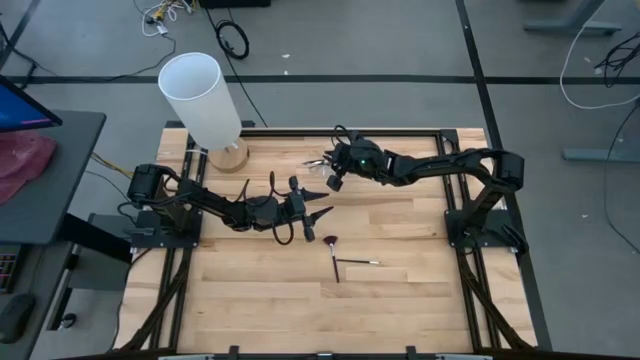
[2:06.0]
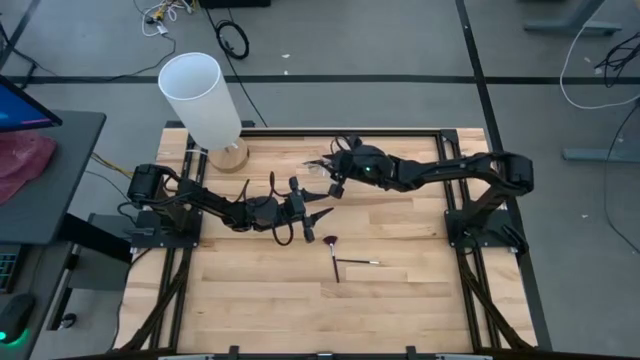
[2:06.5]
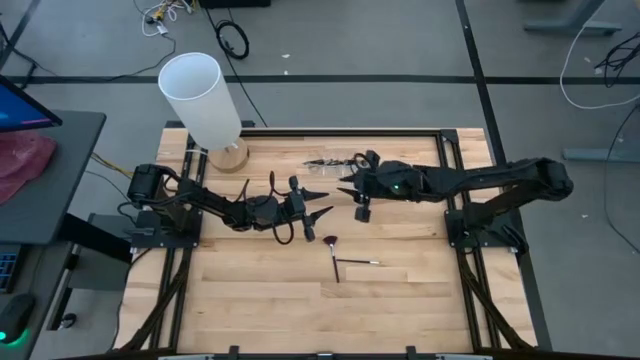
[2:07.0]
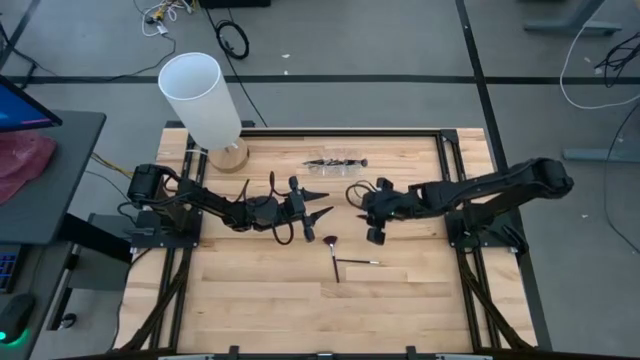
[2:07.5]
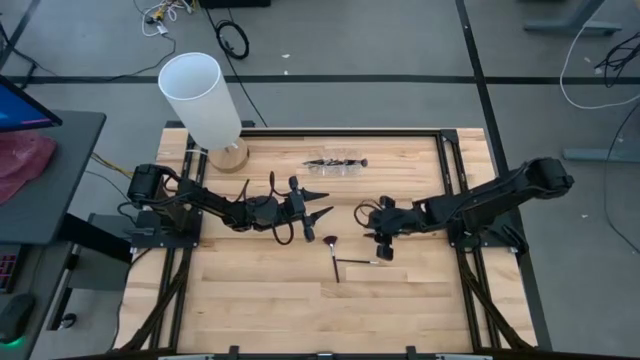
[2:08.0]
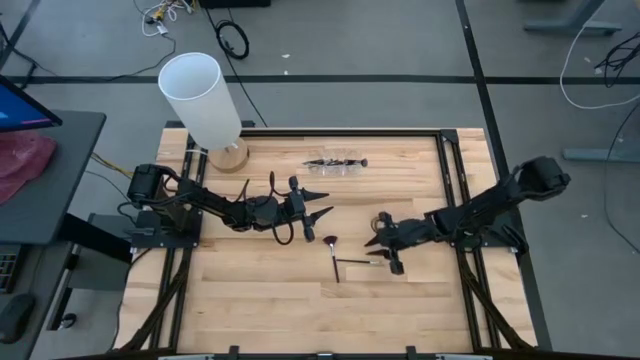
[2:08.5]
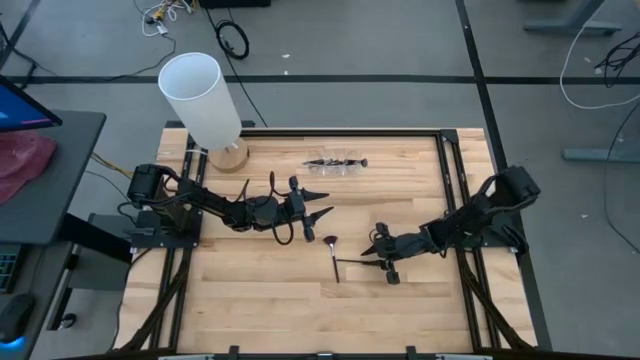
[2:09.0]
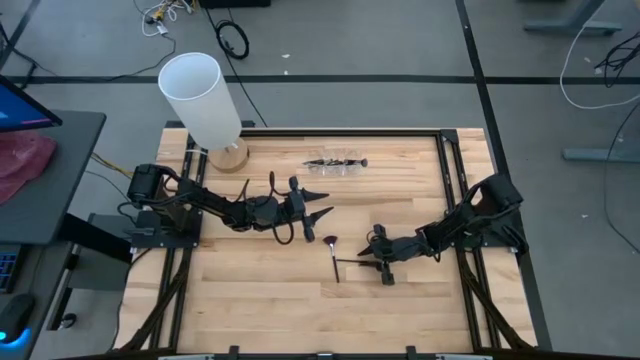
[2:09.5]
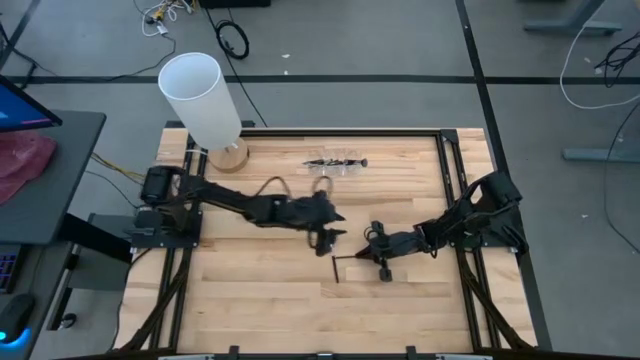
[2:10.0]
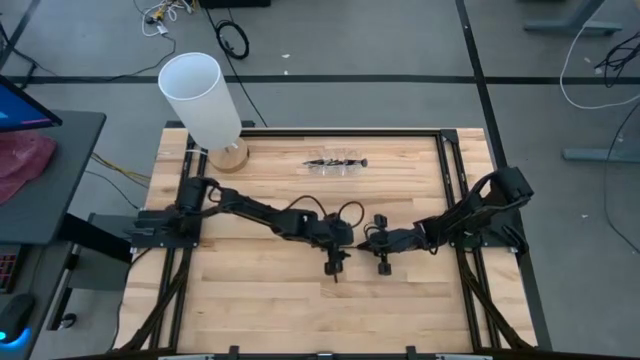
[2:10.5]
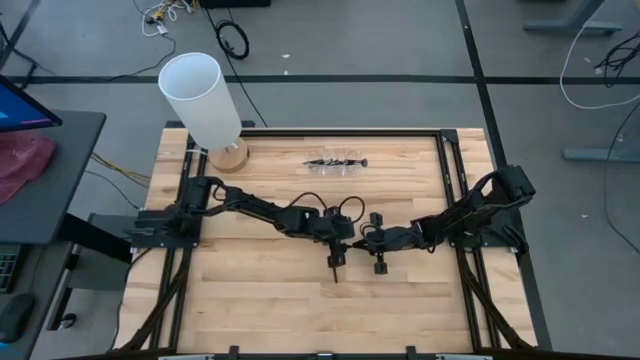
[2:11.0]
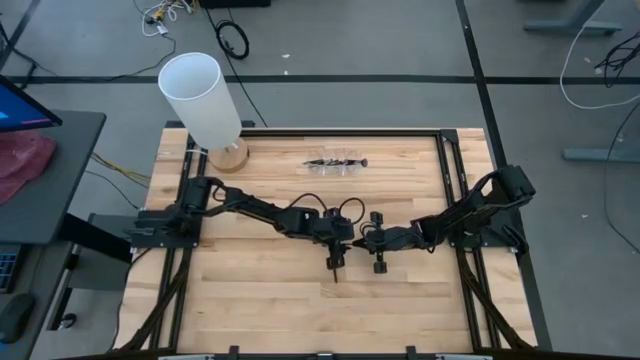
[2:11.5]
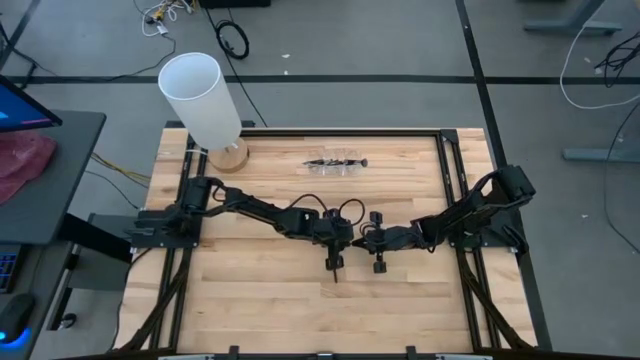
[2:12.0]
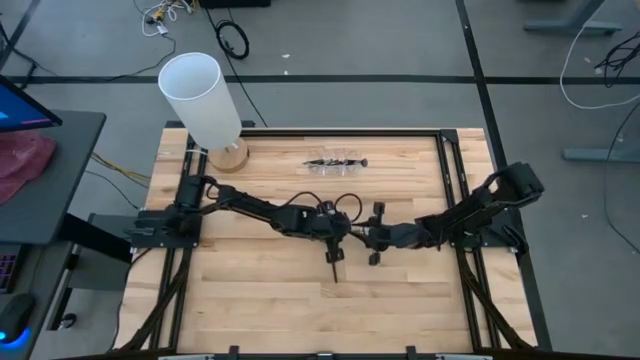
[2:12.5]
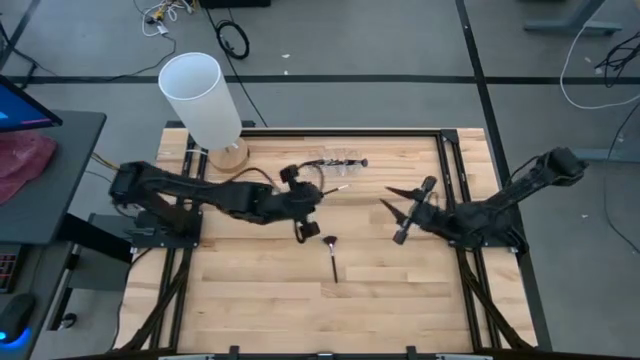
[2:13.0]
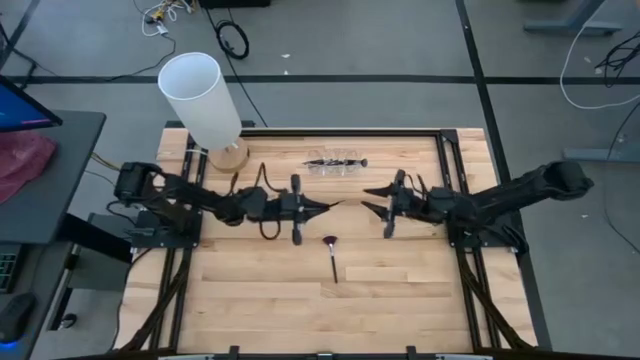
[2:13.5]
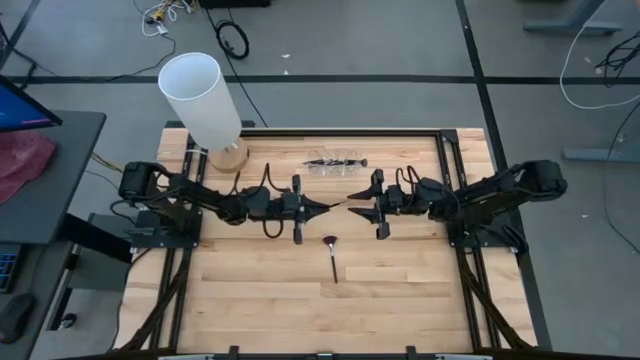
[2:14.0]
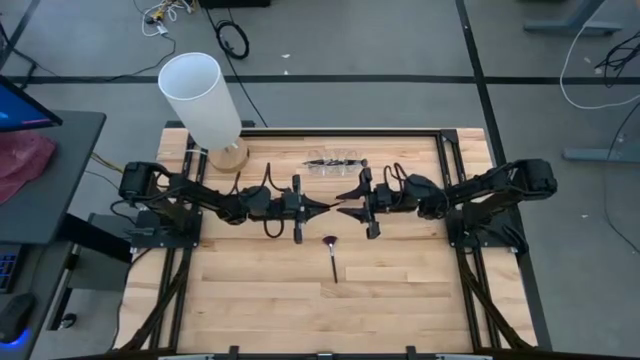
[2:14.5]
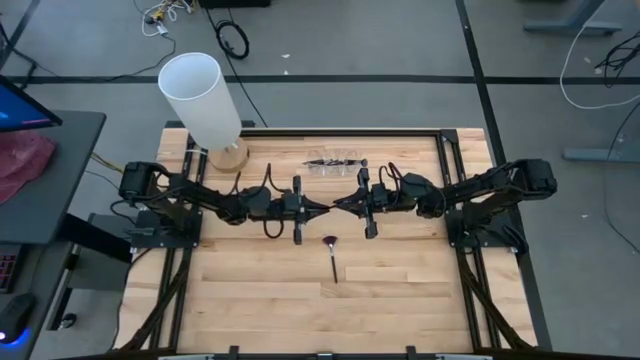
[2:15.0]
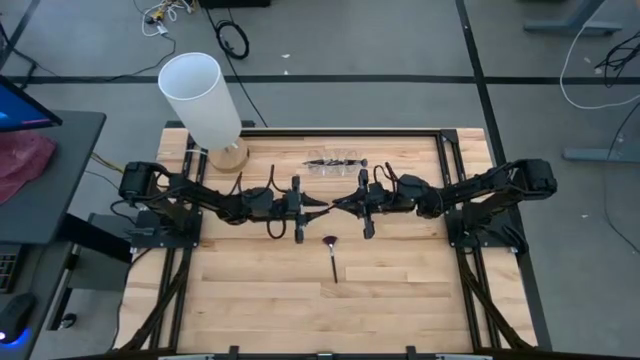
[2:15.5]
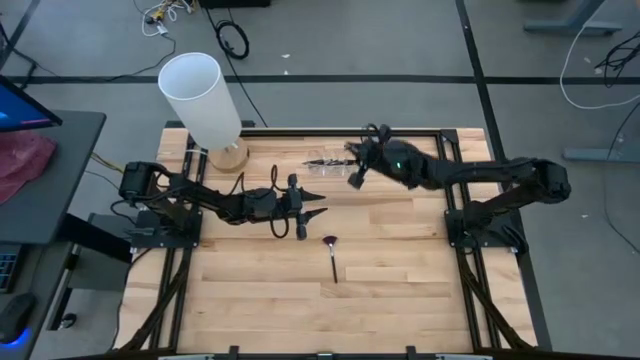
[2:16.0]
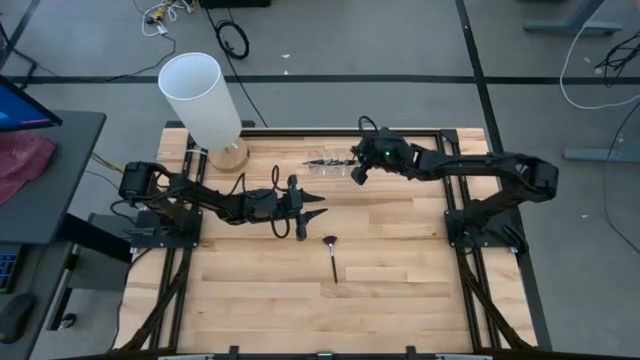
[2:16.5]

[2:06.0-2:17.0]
Task: Pick & Place Makeup Supplies
Put the makeup brush into the transparent organizer

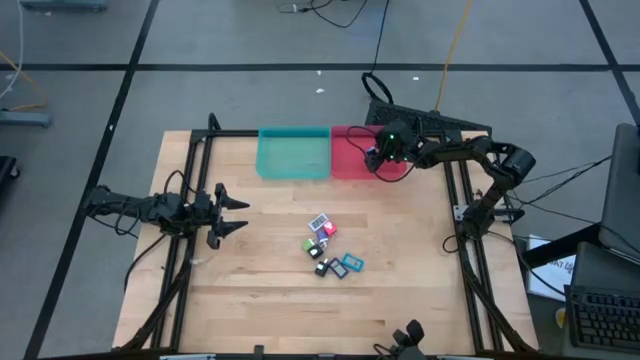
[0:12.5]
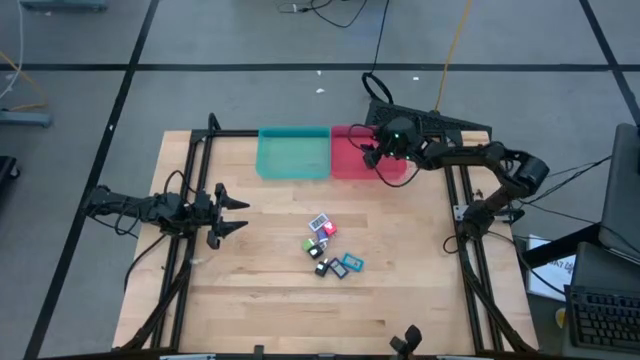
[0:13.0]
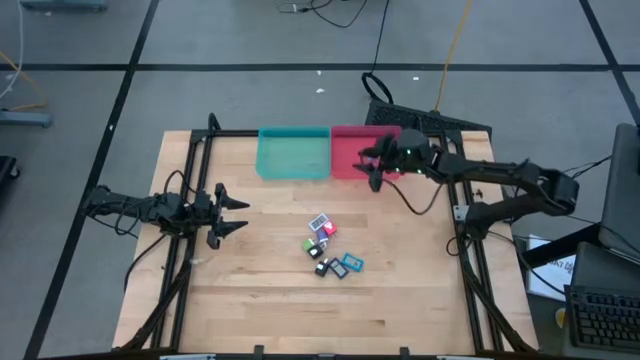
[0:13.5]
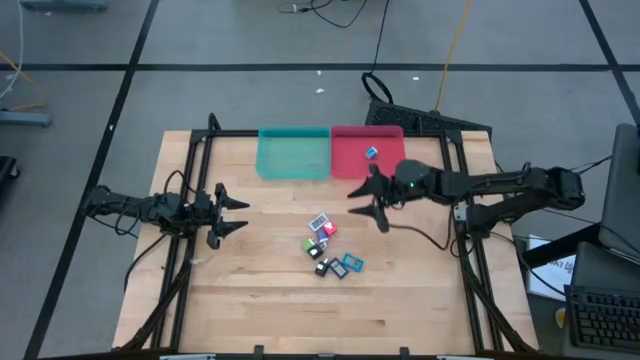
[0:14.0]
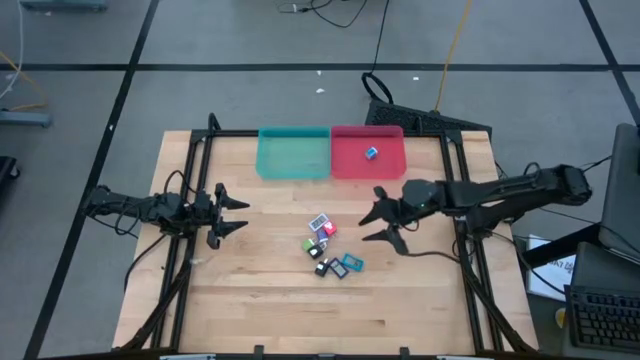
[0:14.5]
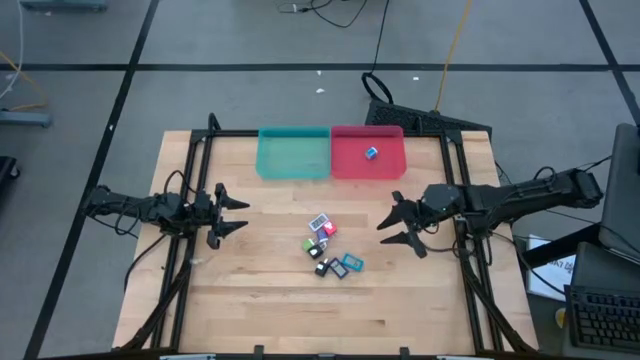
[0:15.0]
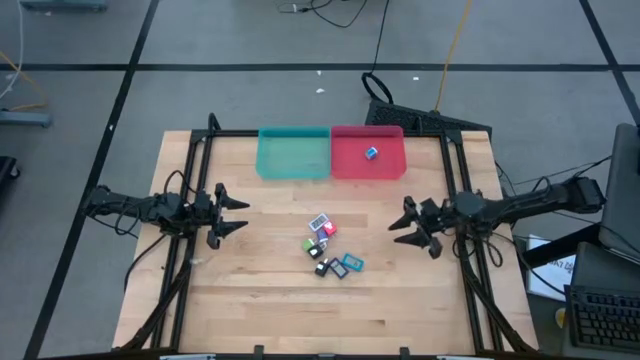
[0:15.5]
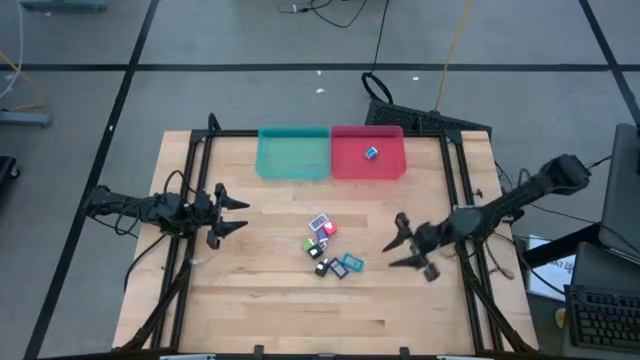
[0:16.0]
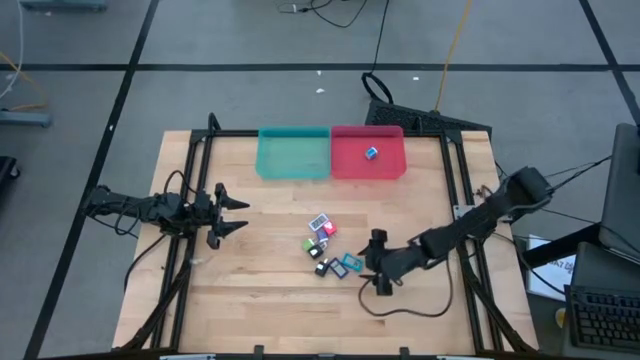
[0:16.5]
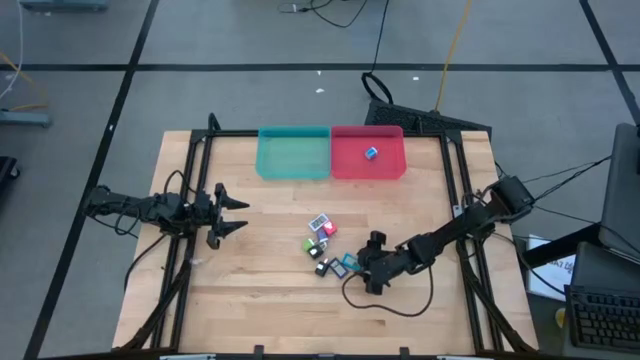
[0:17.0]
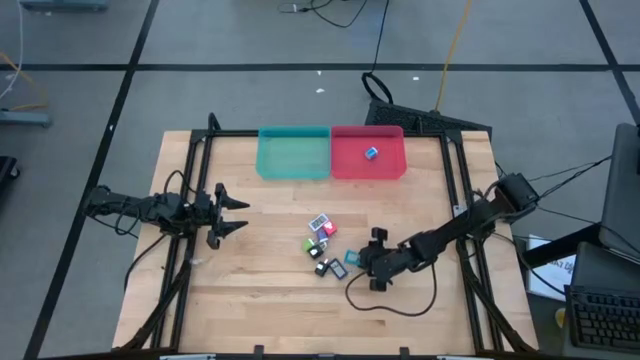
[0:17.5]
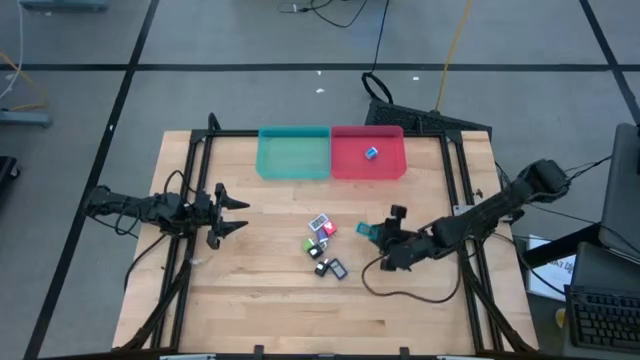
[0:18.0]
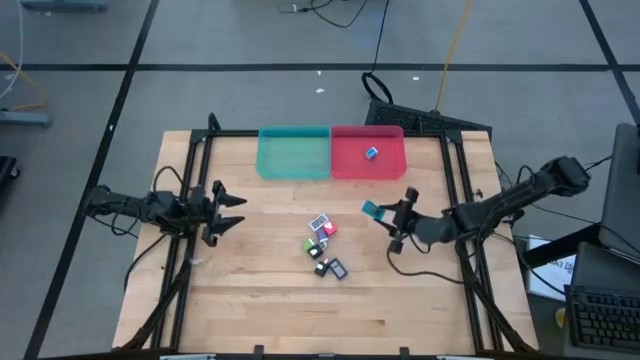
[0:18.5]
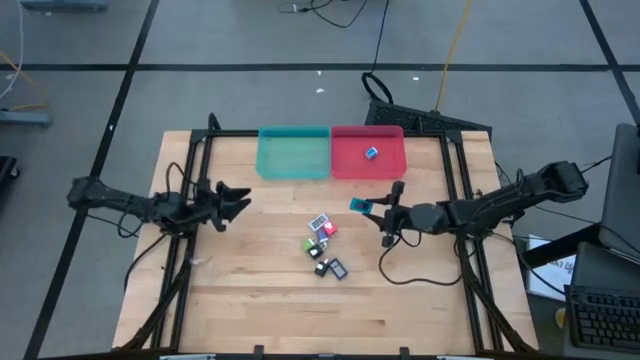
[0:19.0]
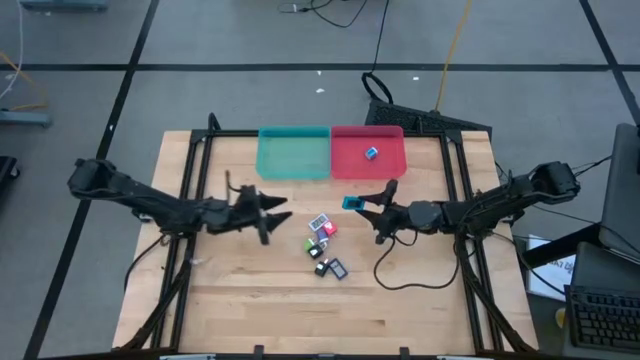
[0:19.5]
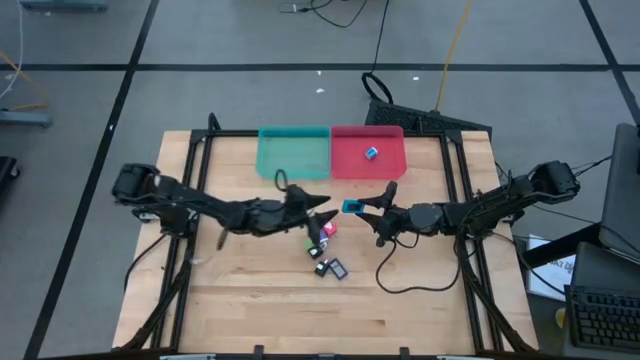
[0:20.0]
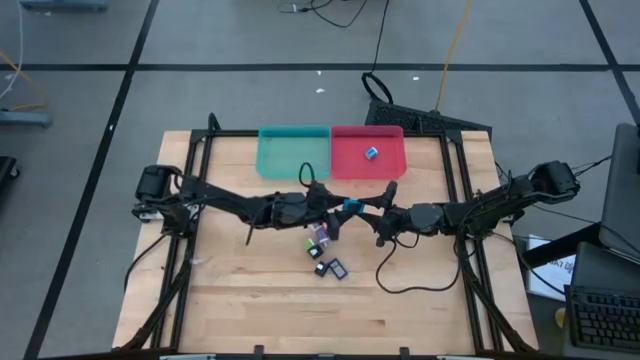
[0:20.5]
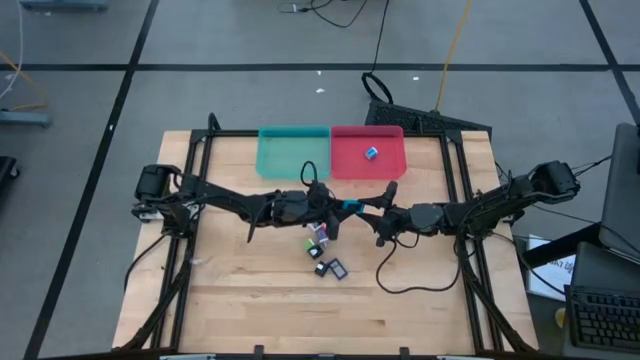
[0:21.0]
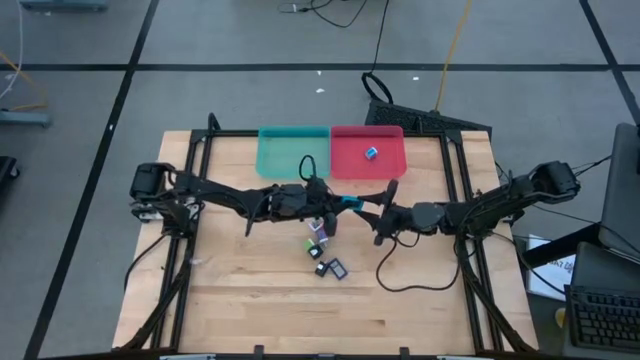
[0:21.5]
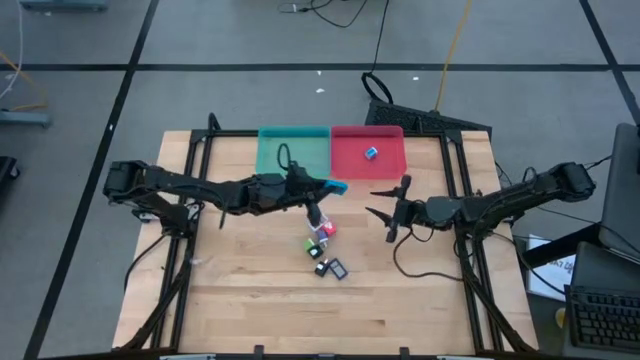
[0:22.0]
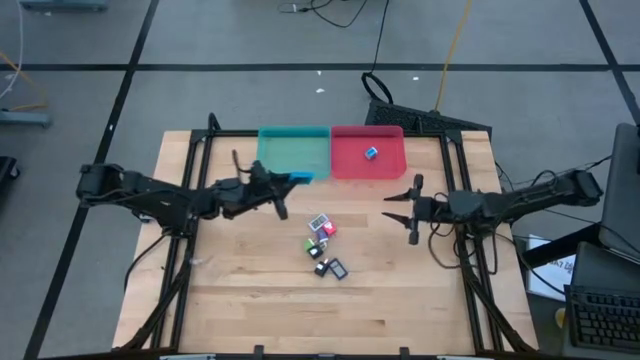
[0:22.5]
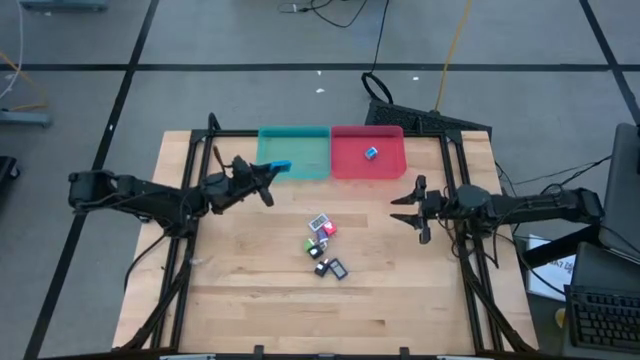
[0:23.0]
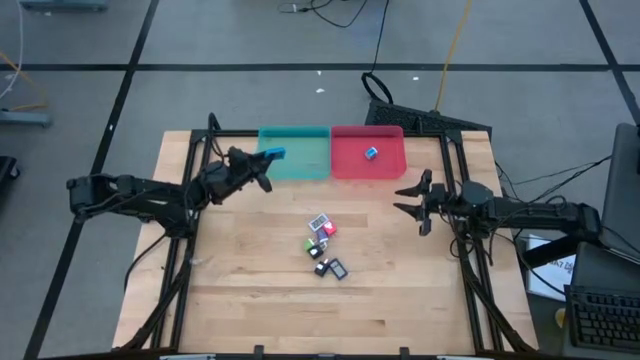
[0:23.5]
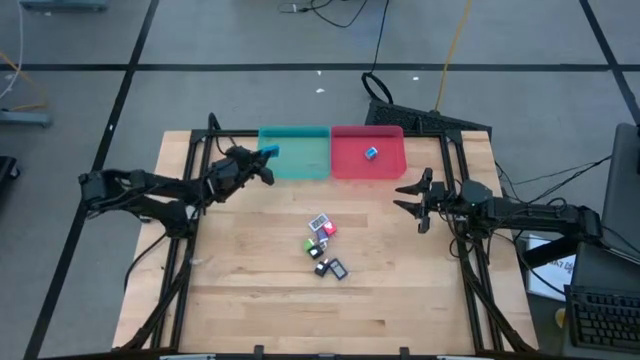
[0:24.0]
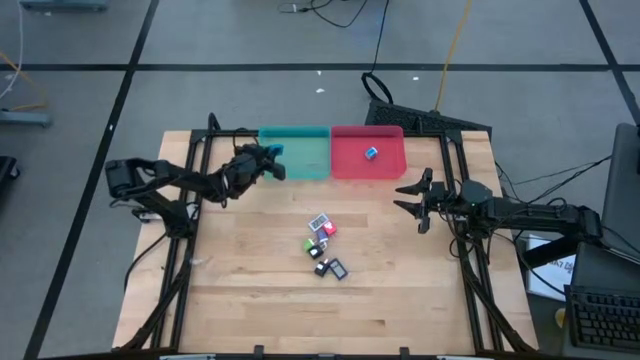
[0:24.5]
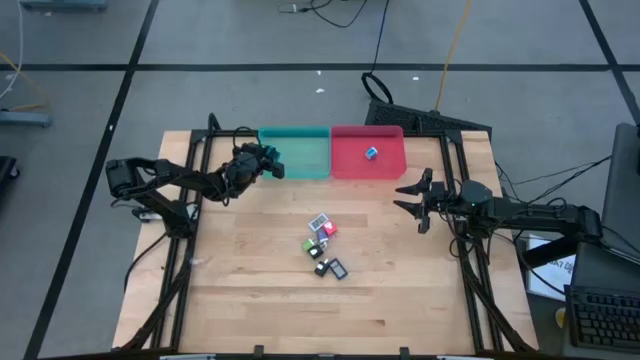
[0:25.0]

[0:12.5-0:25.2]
Task: Sort charging adapters and watches
Put the blue watch in the blue bin
